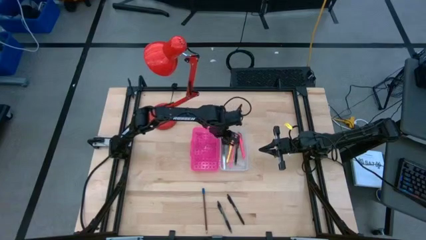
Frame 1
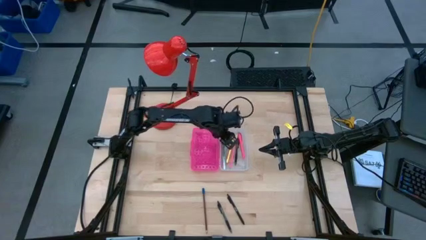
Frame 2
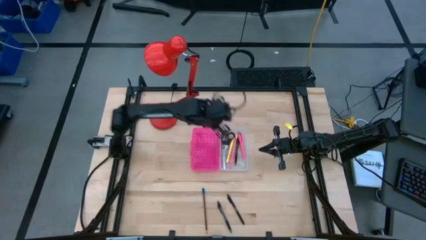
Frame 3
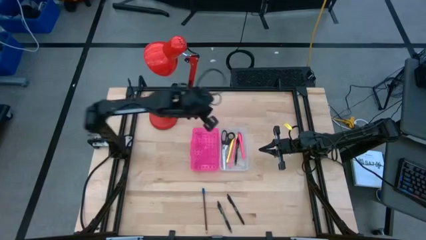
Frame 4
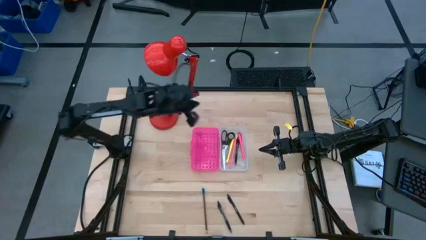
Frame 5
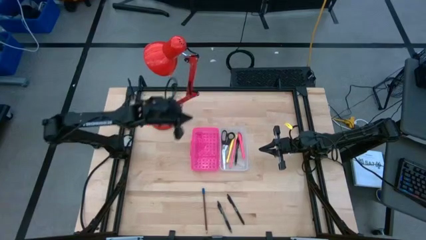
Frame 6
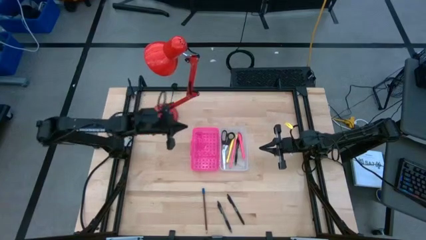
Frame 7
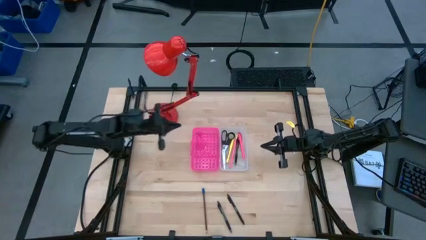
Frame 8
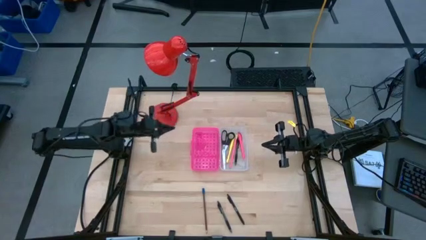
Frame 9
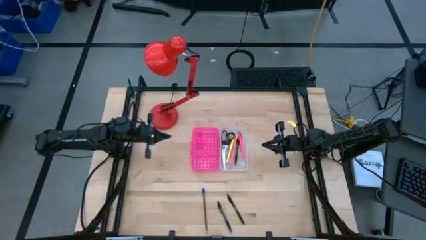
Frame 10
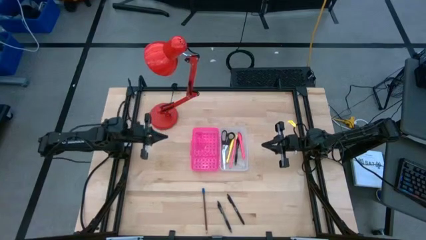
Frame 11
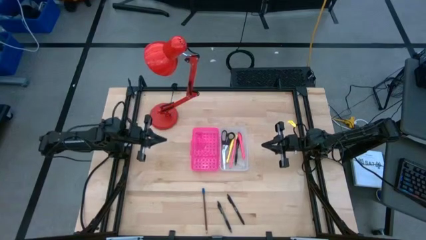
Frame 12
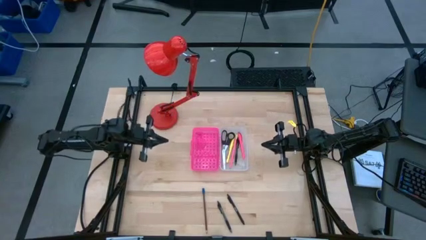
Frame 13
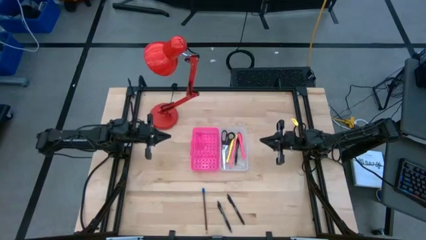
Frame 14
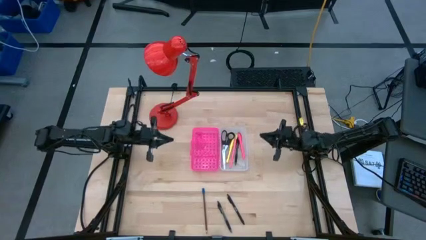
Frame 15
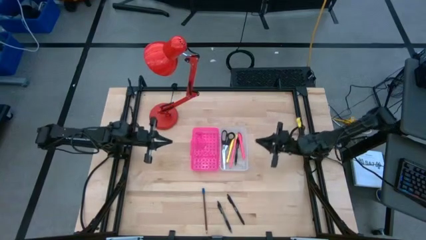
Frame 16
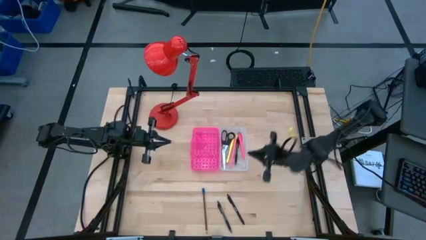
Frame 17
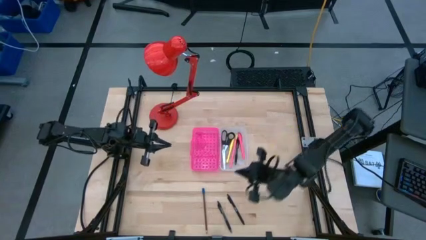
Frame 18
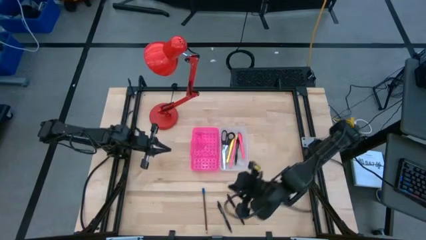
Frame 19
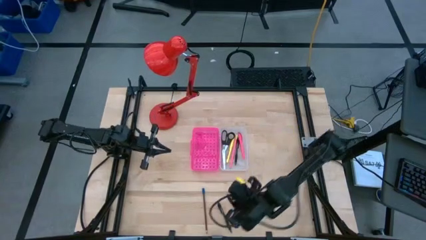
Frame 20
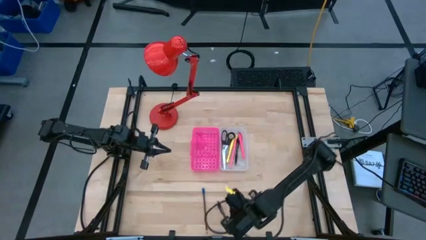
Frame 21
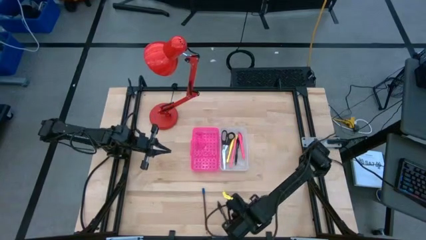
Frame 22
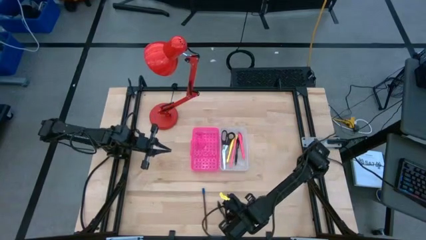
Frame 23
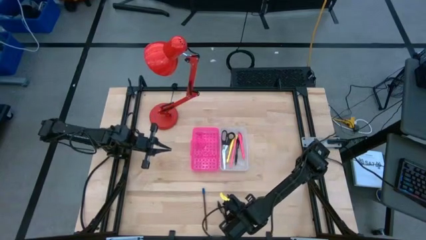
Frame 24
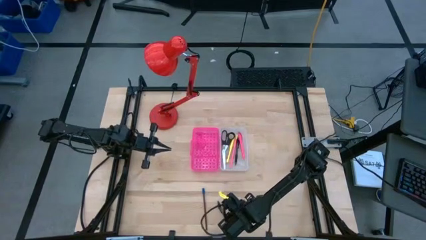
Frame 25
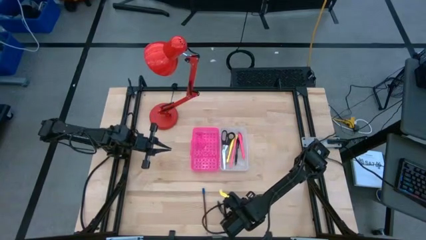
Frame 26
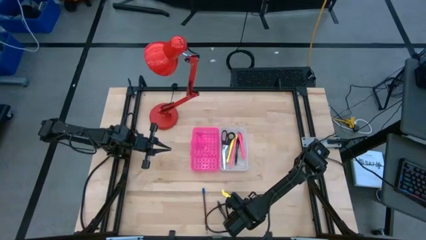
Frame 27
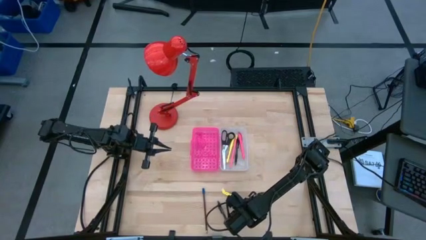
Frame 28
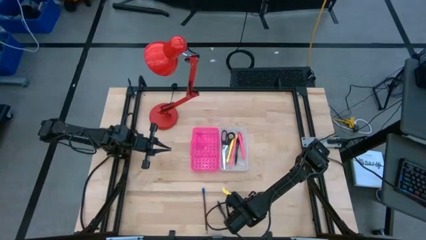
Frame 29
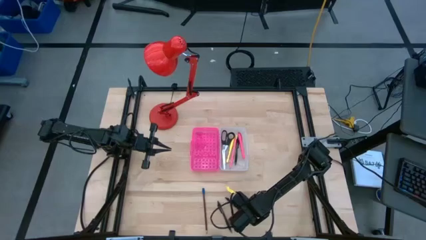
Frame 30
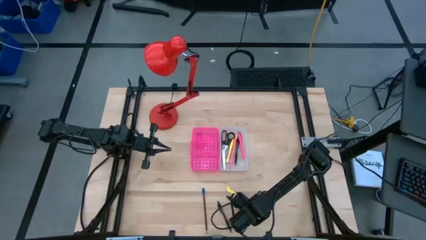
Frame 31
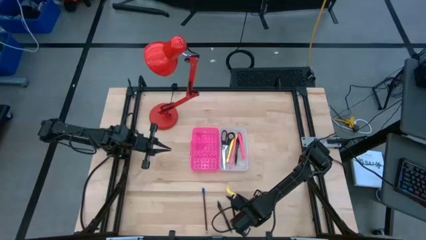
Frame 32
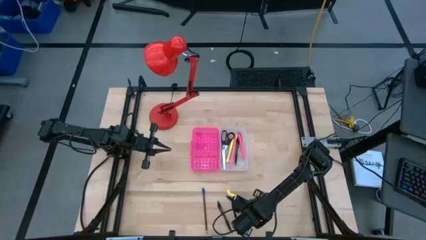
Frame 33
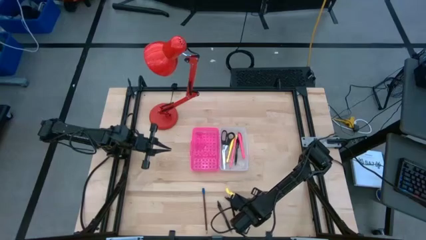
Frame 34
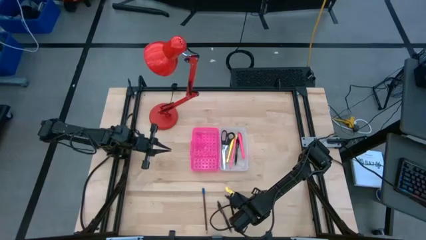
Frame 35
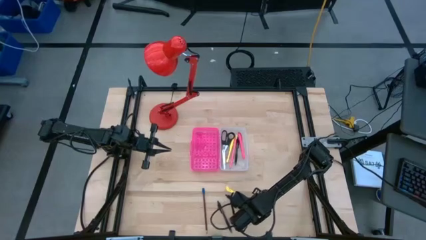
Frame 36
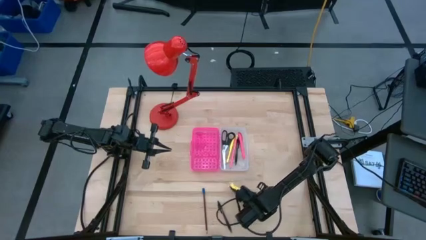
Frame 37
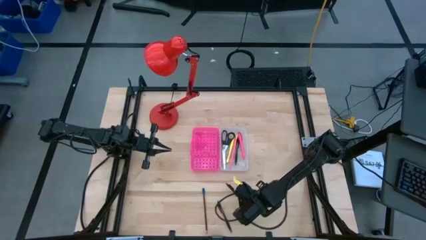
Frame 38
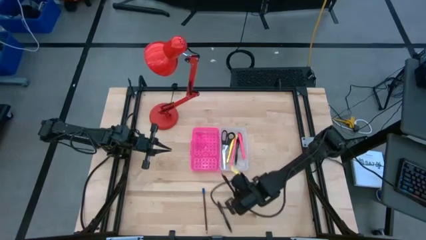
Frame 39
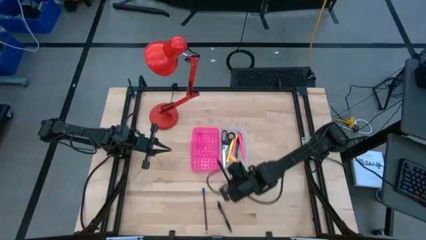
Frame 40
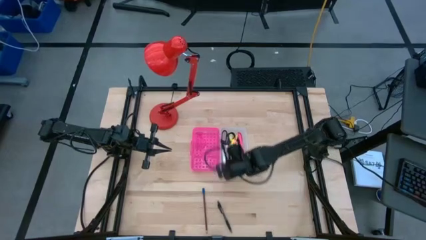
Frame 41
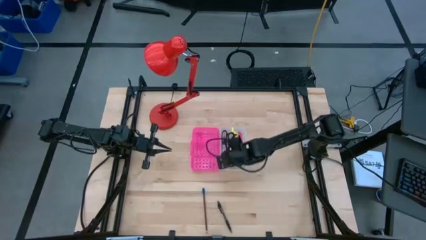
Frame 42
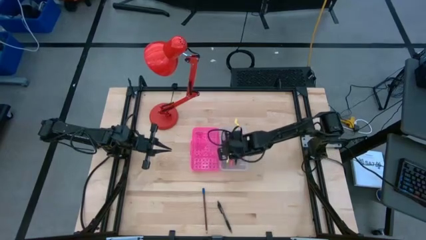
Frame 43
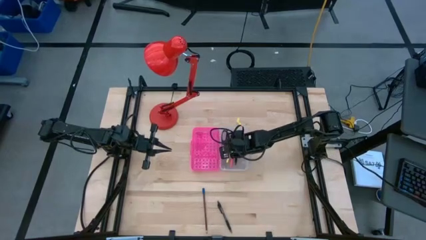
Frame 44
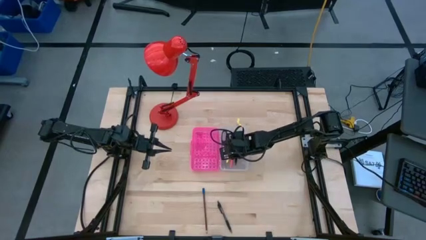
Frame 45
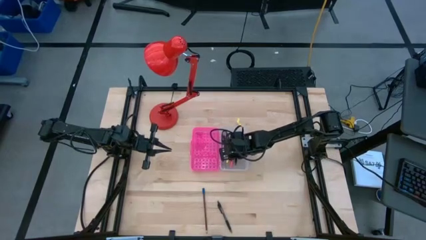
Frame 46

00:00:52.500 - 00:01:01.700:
Task: Pick & place school supplies into a supply box
Put the right black pen into the supply box

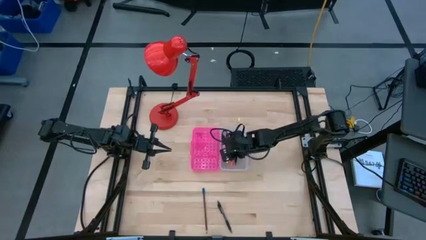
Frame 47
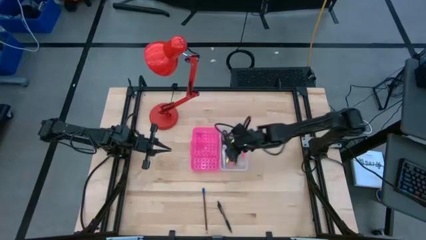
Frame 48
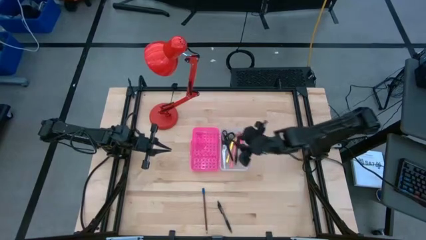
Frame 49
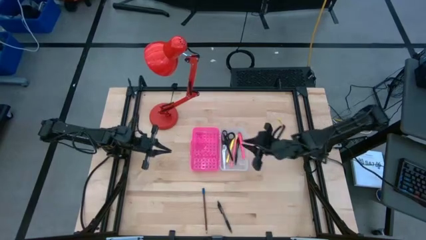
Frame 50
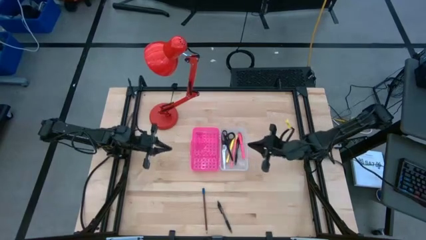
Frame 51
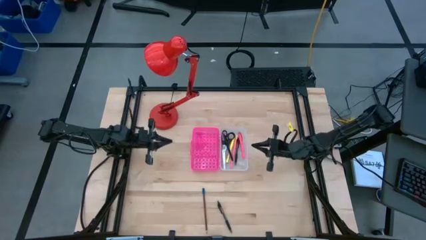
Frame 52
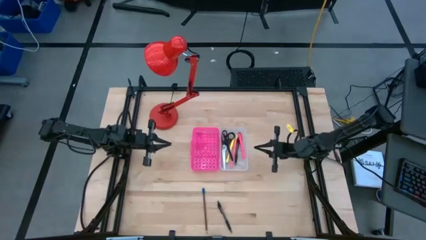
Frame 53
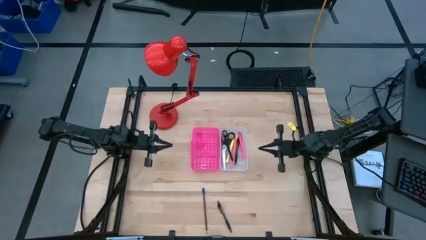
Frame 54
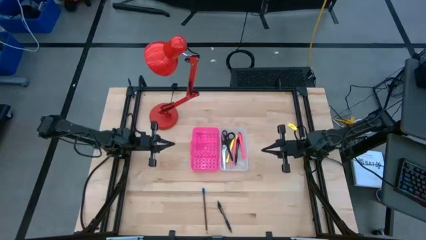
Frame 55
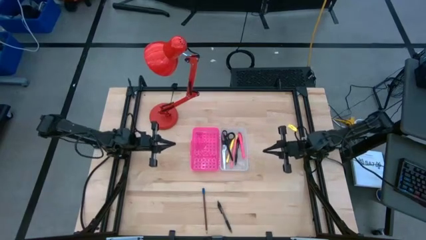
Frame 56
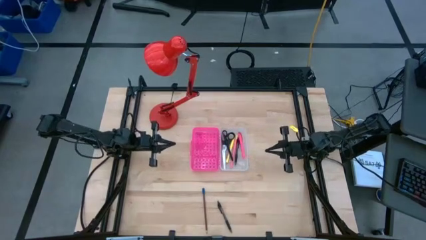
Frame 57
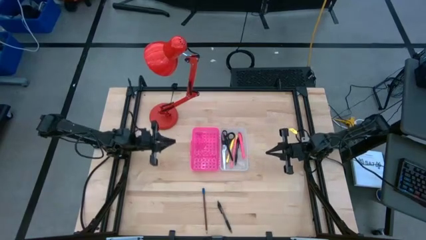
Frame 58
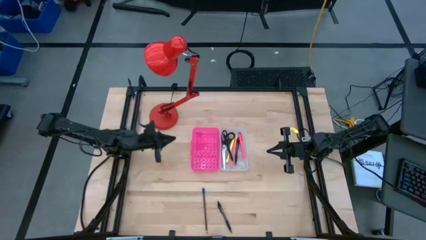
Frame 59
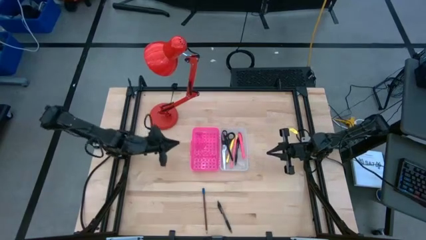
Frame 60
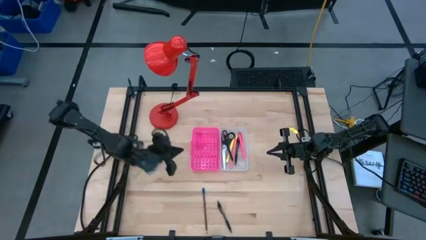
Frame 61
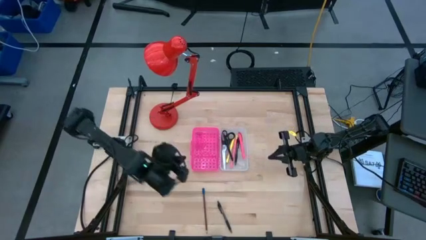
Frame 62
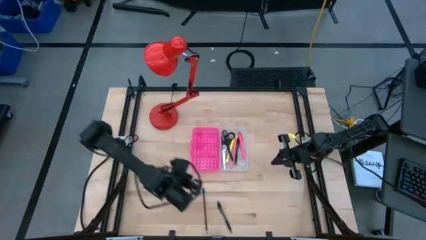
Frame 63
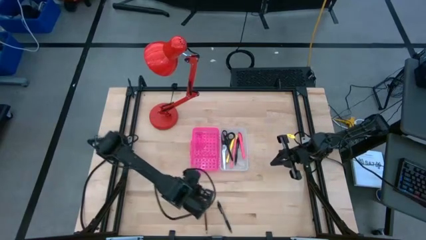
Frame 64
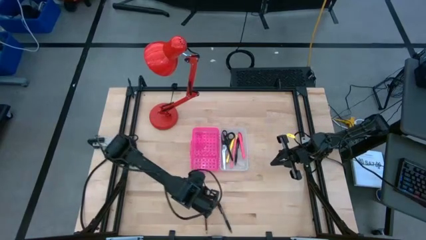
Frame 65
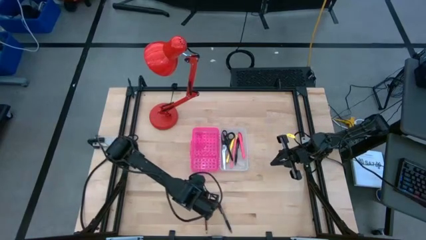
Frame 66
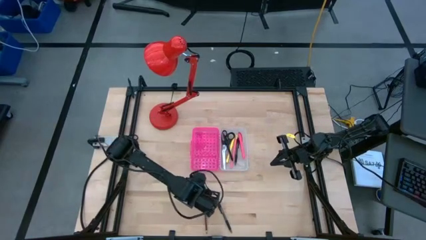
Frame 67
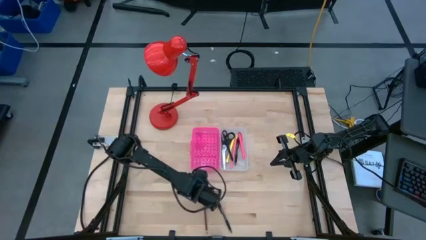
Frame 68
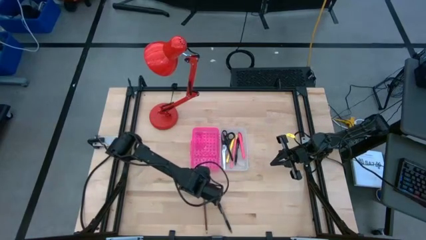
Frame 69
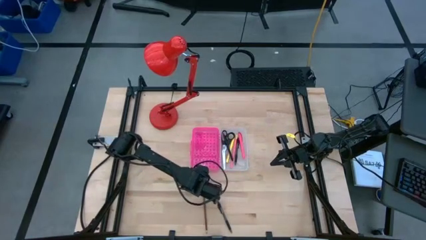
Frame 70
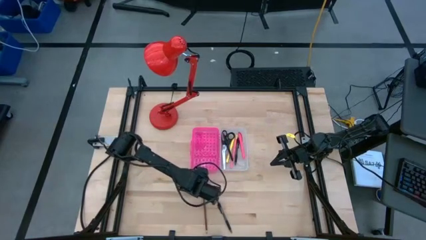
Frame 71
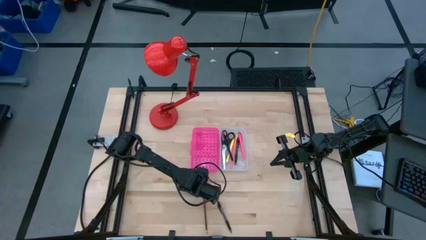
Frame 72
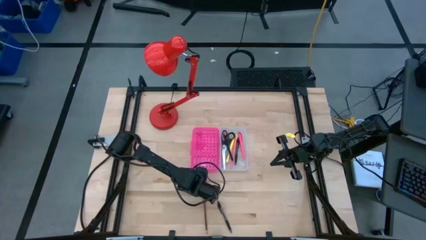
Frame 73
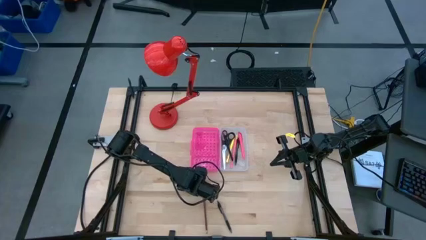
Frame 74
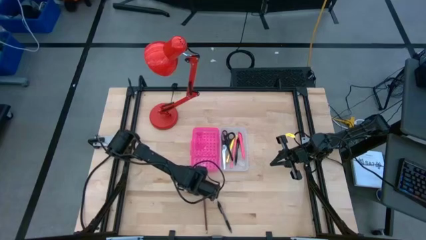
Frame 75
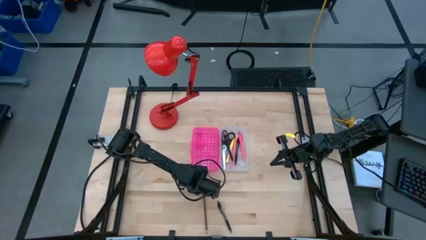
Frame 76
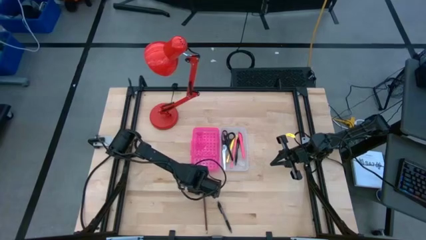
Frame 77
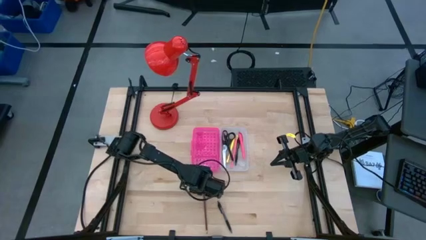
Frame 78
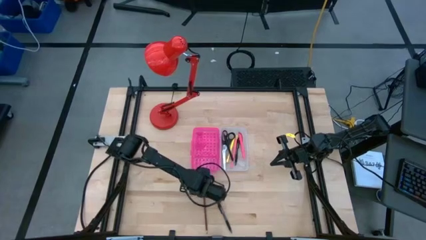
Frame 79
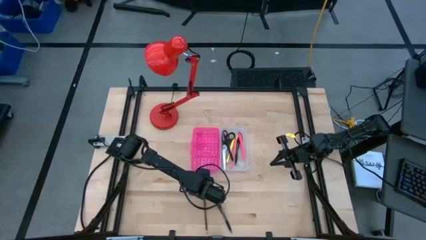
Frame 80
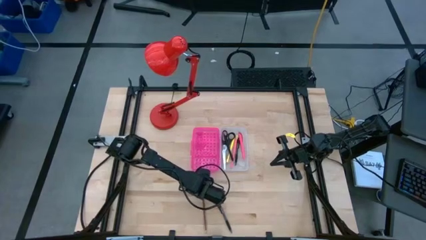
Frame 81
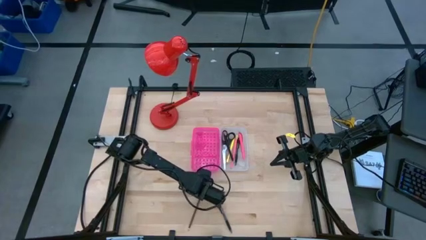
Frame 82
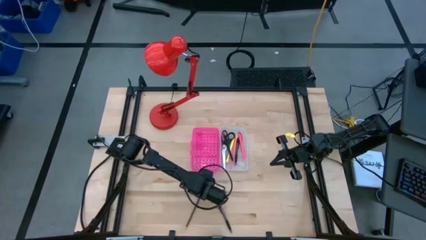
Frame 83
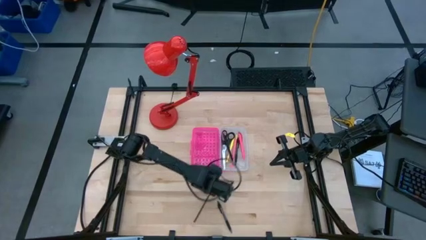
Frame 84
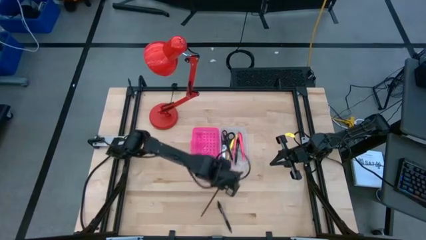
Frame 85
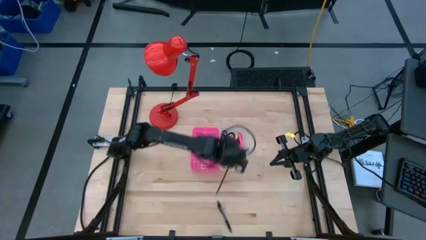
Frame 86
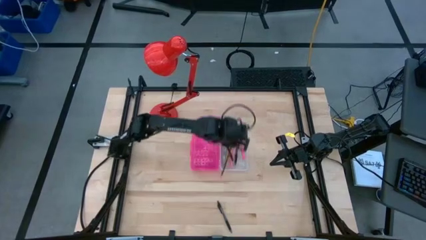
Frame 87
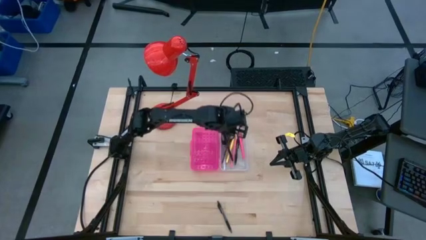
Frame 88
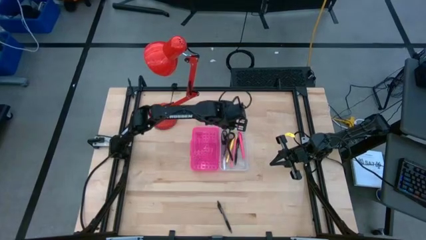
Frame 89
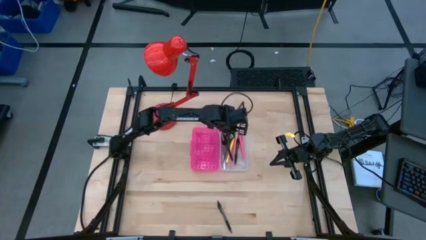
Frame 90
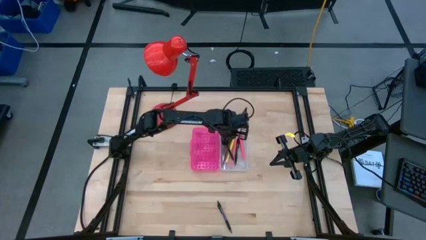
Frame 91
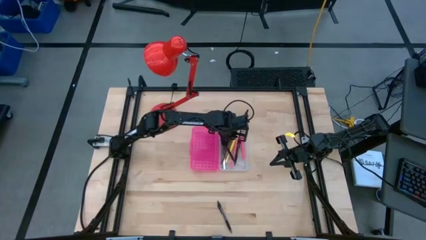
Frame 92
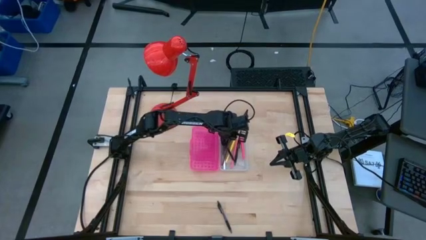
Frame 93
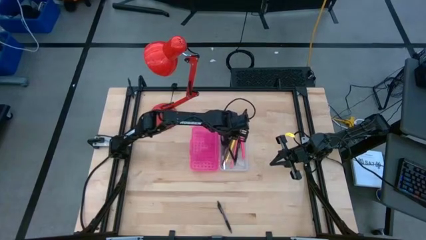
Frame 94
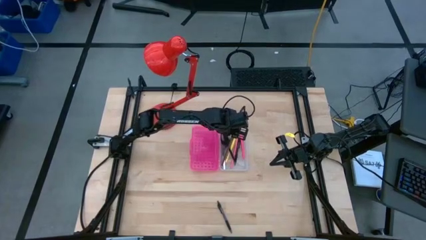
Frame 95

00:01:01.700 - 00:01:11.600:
Put the brown pencil into the supply box
